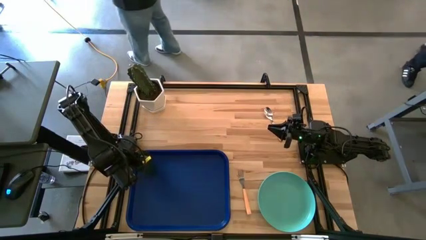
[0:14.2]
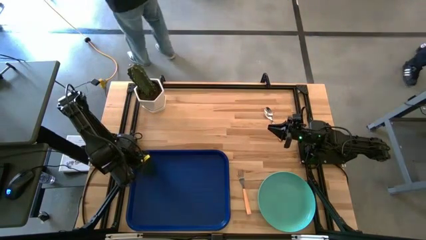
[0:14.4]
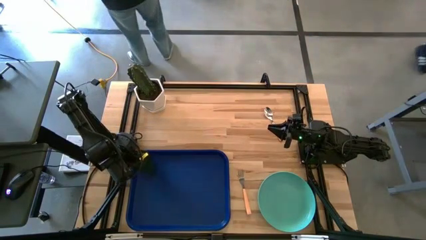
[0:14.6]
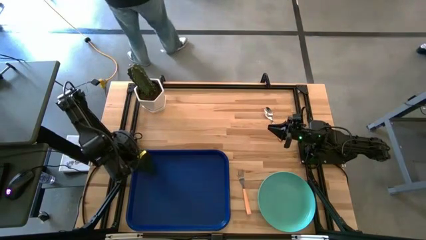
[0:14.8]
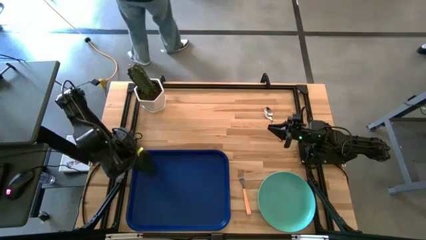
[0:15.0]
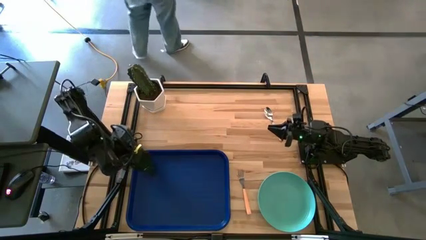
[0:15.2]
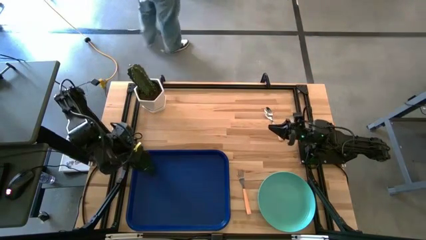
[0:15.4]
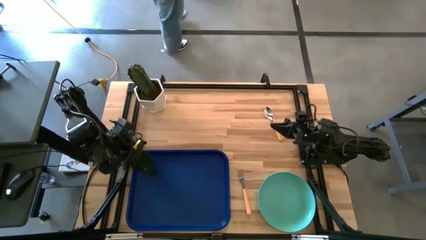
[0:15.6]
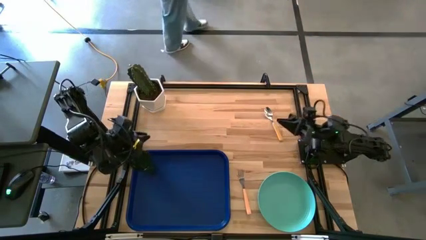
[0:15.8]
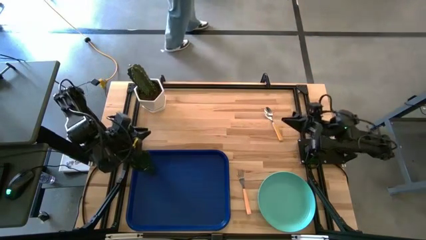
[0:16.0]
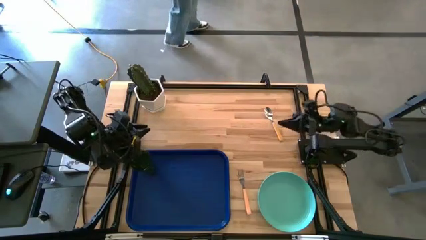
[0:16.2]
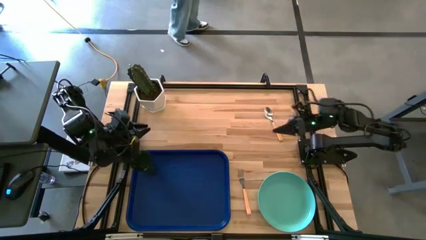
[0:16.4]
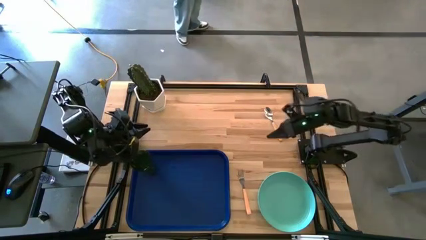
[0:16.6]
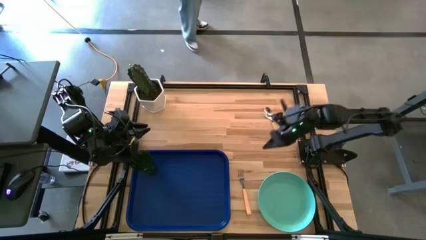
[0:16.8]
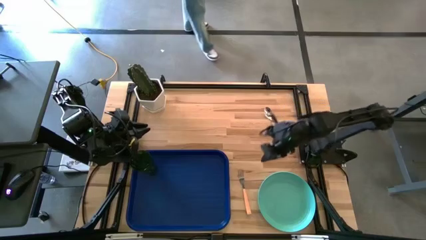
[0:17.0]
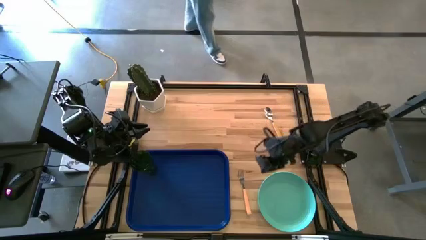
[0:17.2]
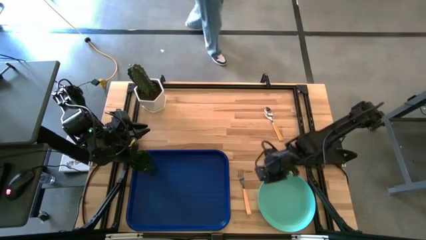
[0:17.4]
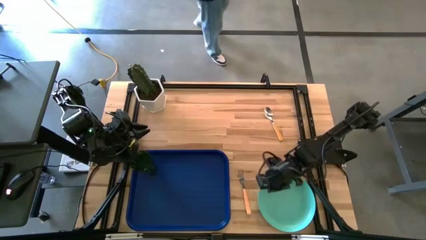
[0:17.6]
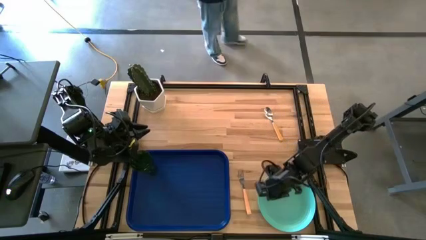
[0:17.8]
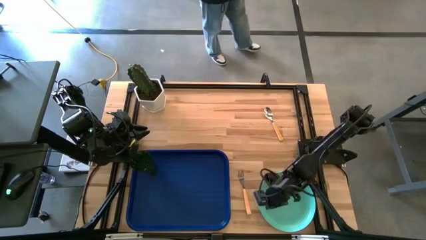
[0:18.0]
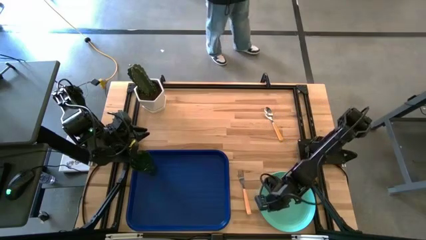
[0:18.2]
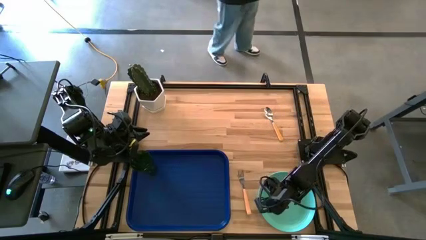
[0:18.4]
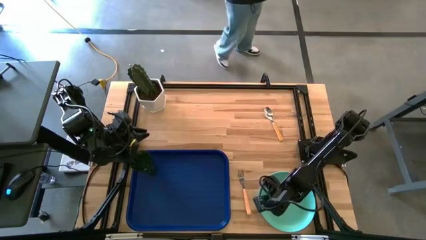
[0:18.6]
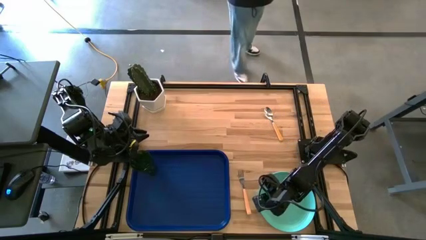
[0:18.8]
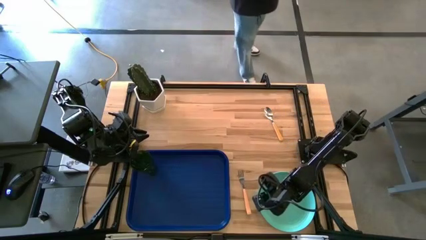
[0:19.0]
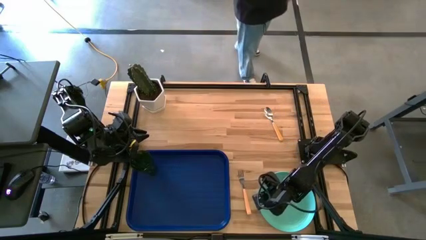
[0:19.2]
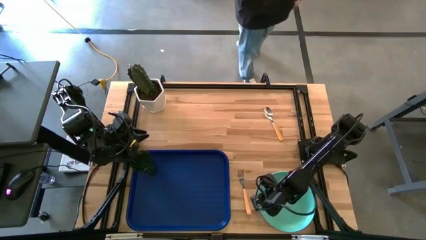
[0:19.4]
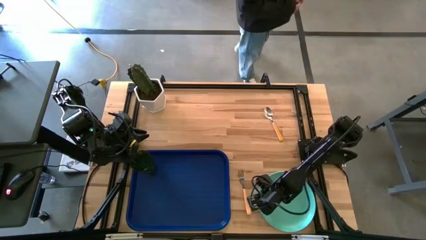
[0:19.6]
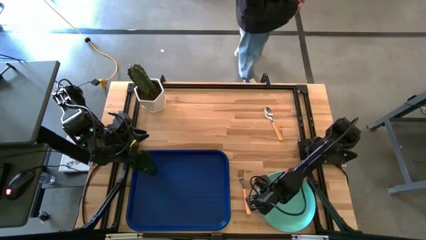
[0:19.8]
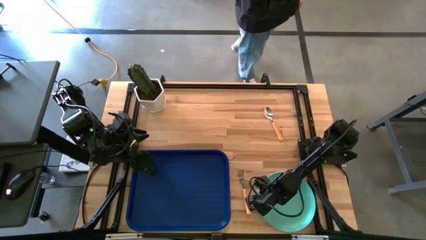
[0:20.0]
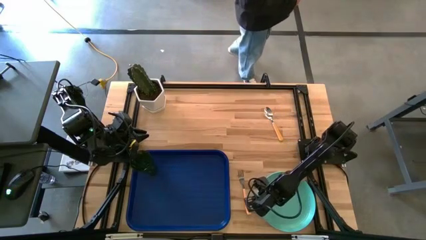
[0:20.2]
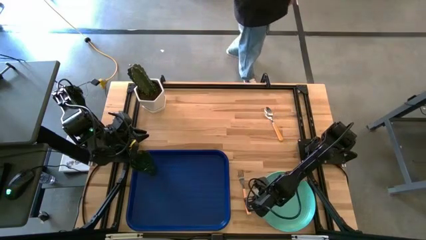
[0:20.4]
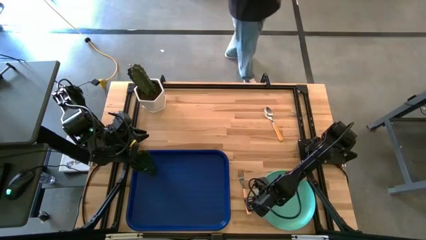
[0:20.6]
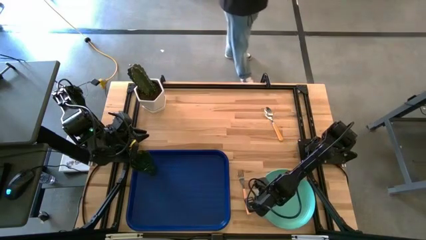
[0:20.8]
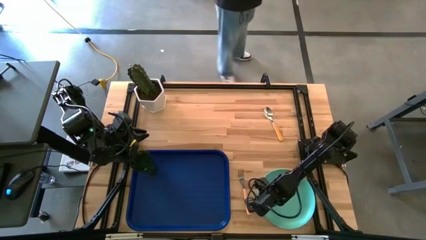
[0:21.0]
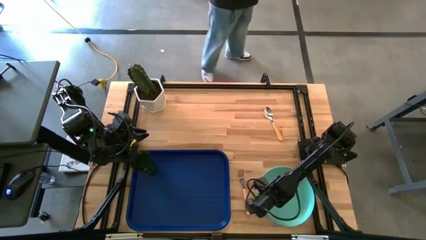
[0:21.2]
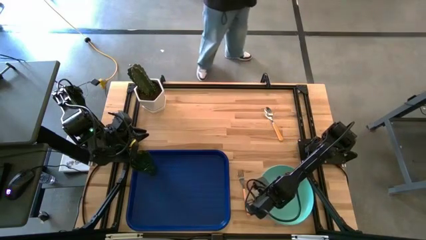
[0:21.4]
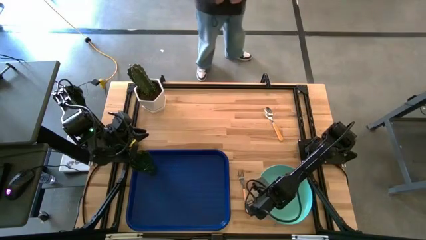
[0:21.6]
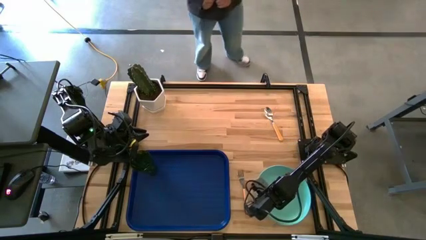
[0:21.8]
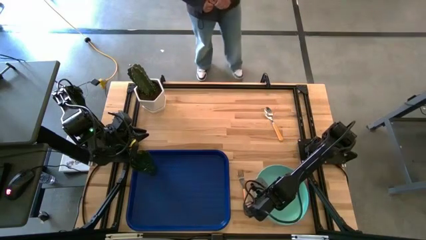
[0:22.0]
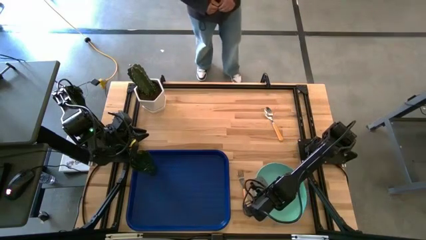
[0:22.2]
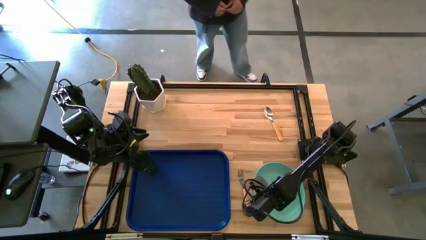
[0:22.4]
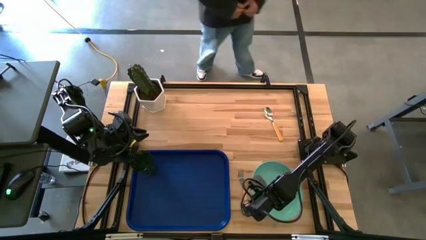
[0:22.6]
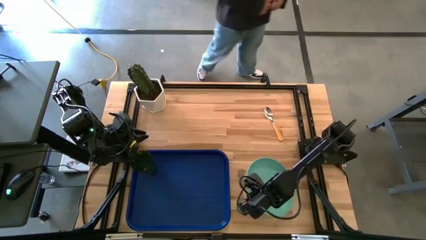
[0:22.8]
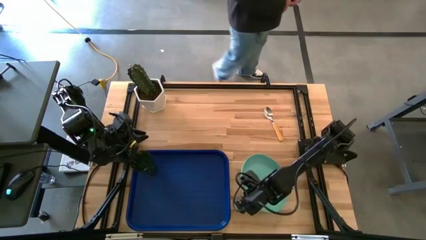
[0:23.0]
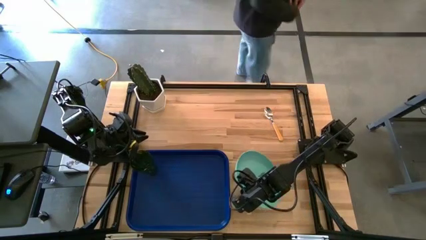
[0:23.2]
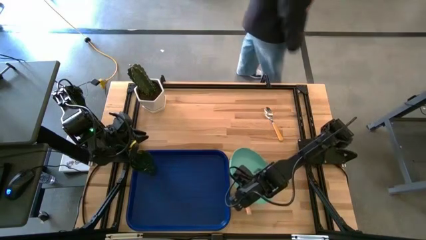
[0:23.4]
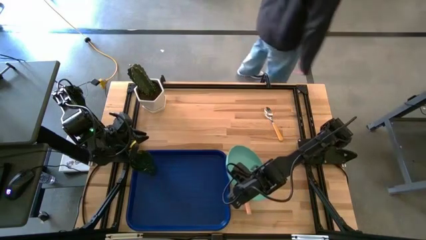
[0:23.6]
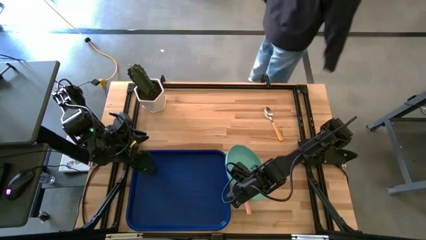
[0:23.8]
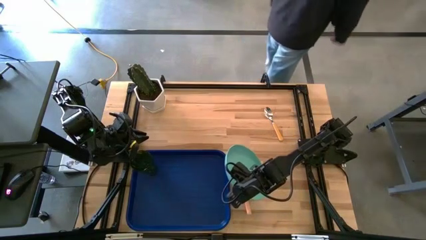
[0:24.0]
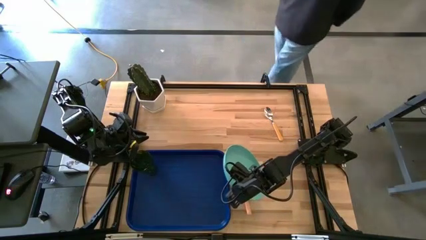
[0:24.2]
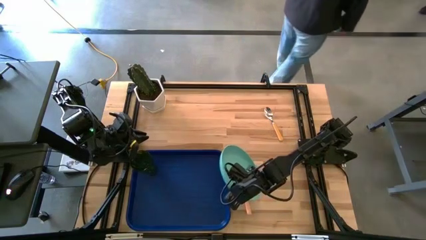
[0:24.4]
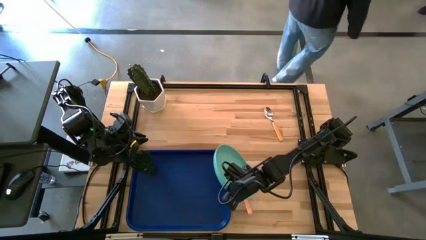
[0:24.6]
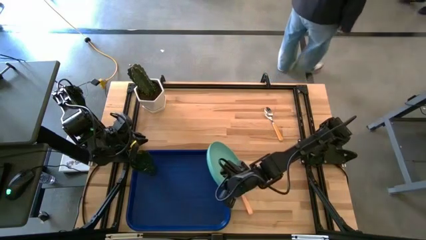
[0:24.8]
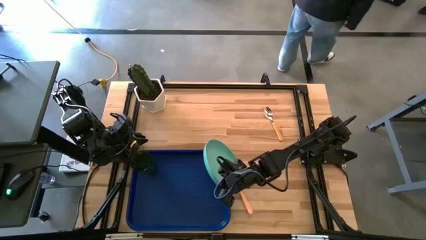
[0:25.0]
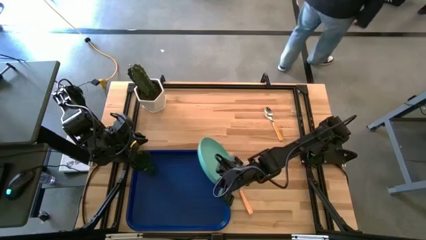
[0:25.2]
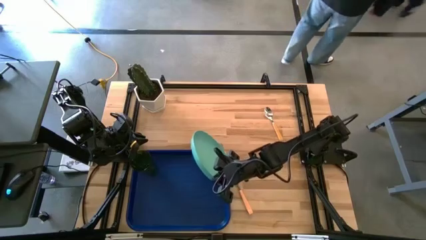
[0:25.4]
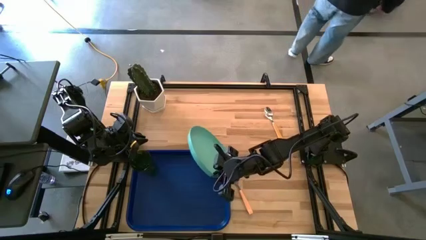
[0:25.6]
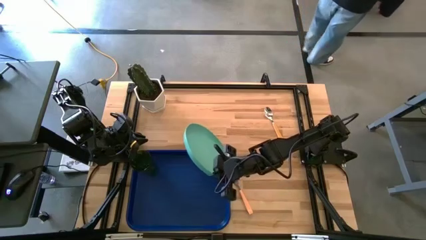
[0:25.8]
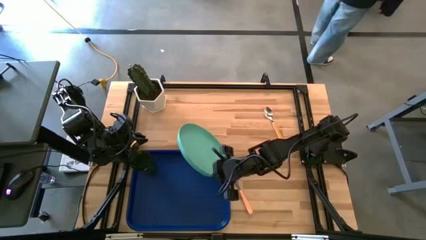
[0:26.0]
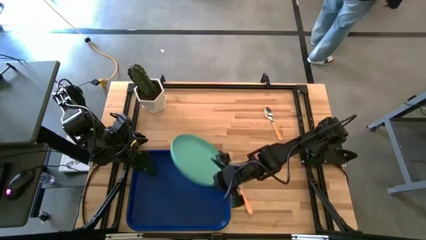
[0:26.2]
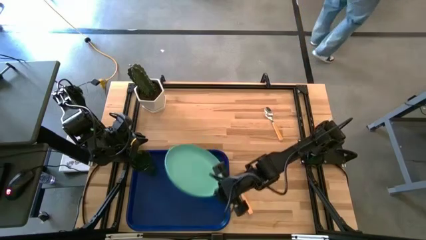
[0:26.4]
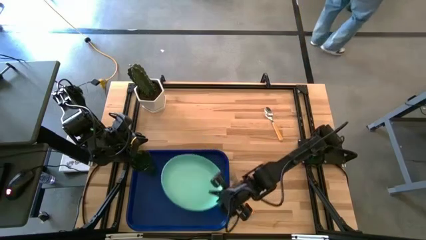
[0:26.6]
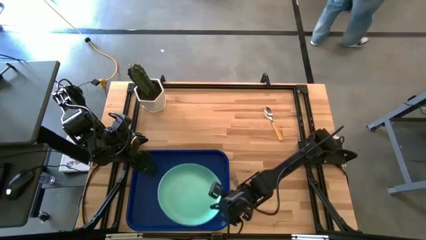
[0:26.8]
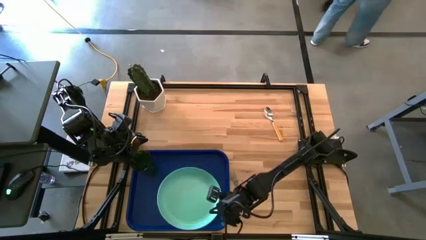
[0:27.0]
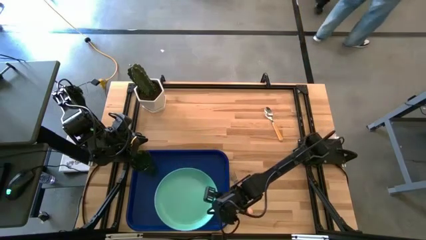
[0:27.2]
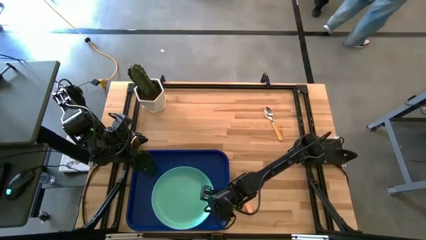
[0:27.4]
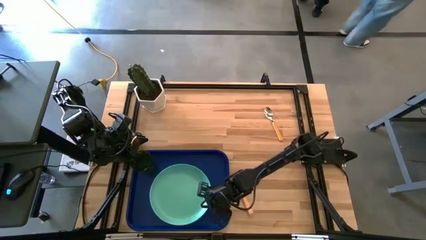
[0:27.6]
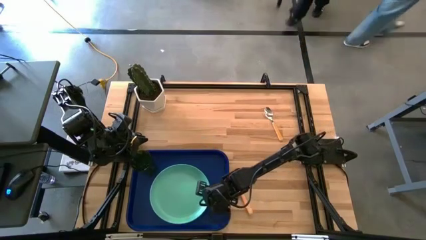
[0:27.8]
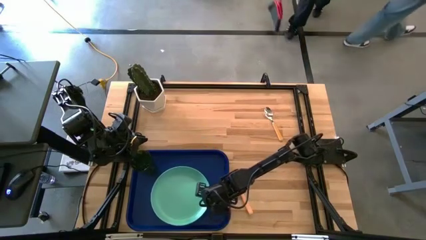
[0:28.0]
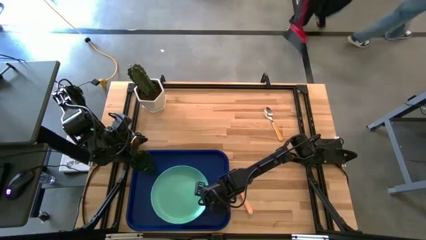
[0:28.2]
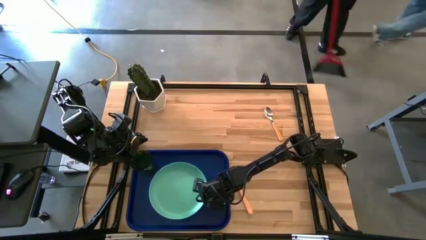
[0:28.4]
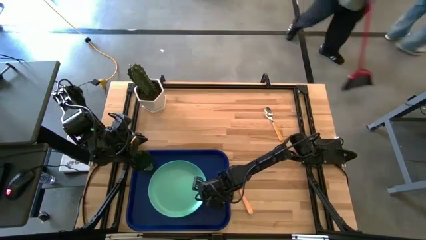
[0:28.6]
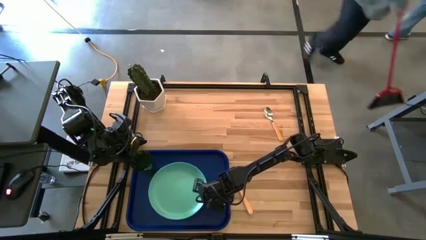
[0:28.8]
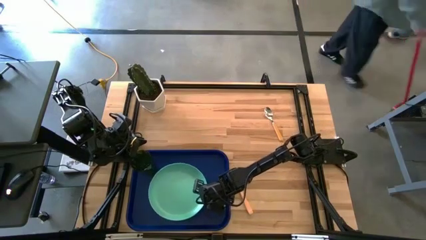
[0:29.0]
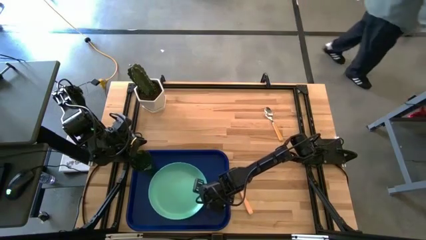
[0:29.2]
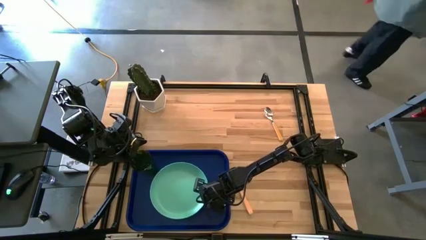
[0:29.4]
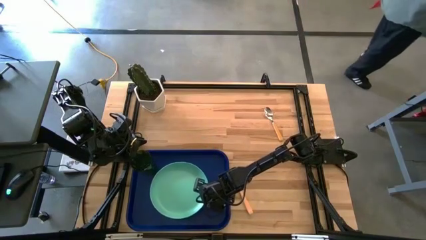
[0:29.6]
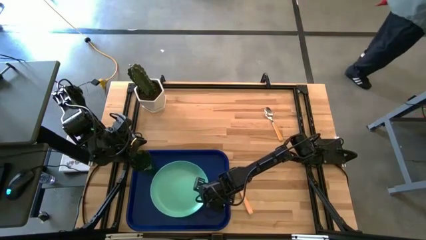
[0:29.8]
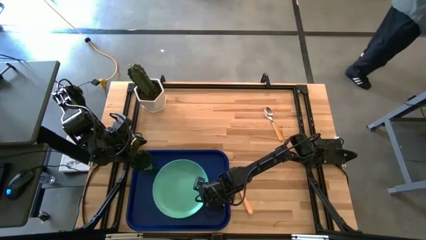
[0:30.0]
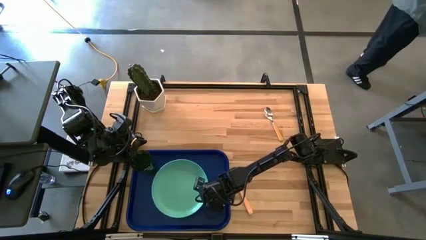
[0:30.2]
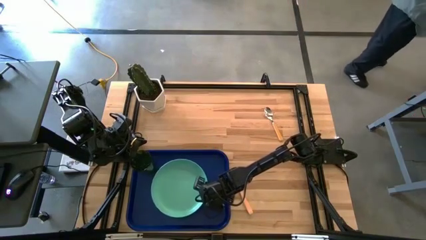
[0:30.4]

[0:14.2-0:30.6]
Task: Pick and place plate/cup/fork/spoon on tray
Put the green plate on the blue tray to the bottom right of the green cup
